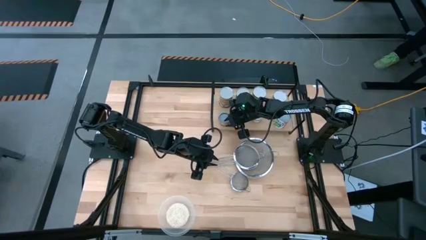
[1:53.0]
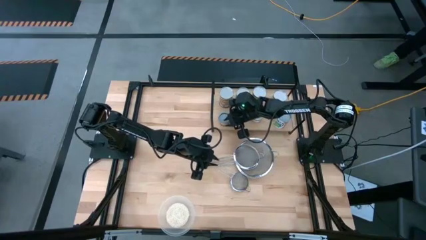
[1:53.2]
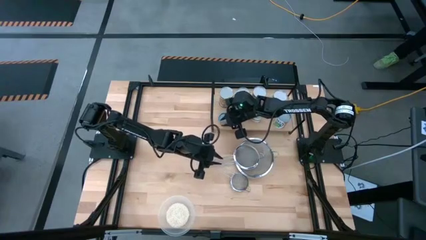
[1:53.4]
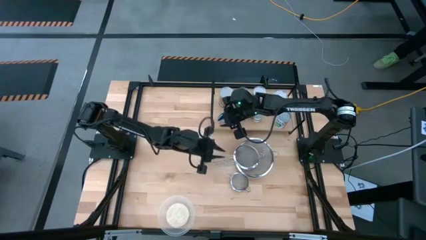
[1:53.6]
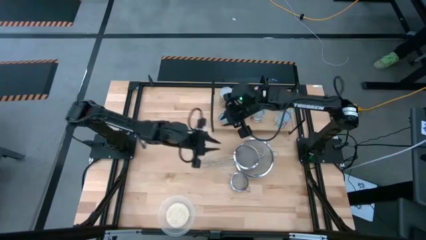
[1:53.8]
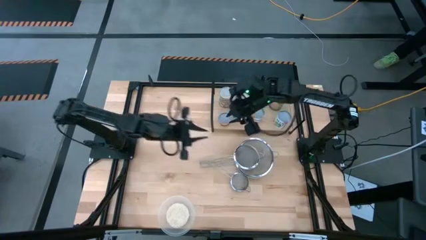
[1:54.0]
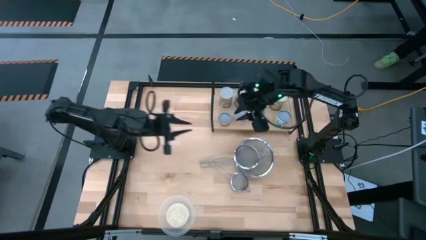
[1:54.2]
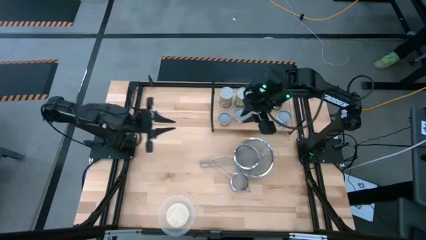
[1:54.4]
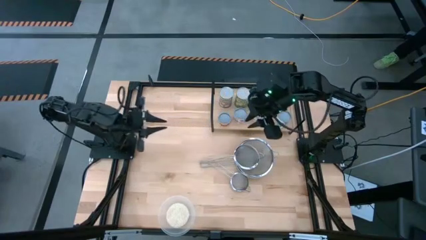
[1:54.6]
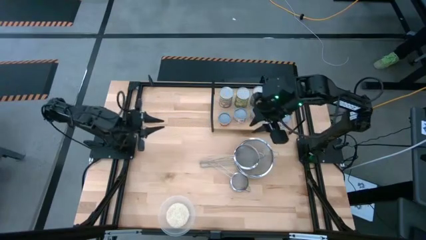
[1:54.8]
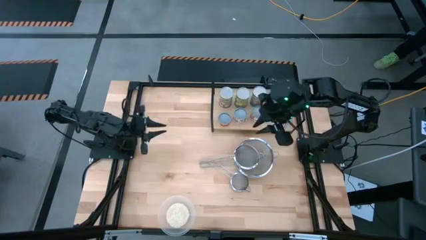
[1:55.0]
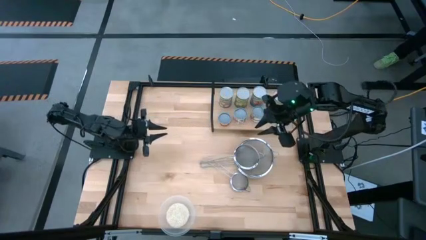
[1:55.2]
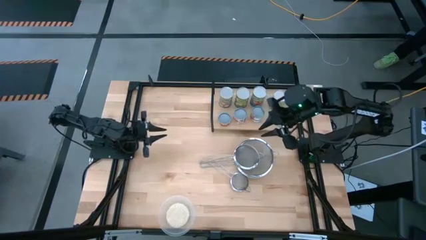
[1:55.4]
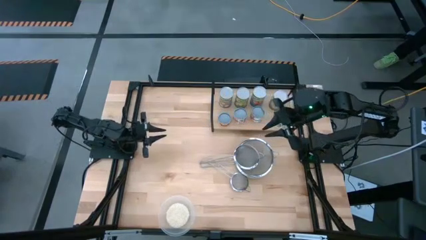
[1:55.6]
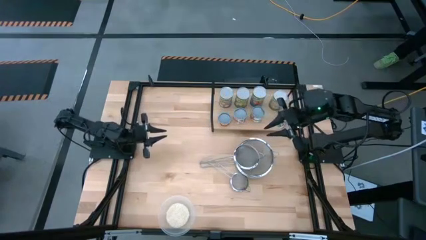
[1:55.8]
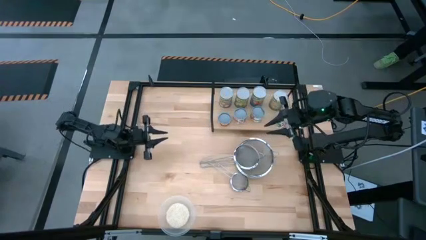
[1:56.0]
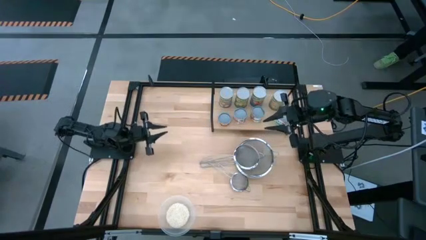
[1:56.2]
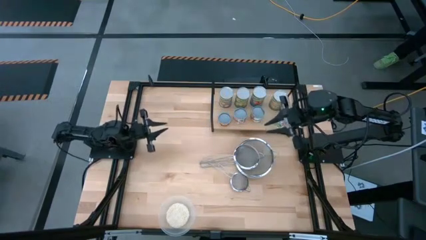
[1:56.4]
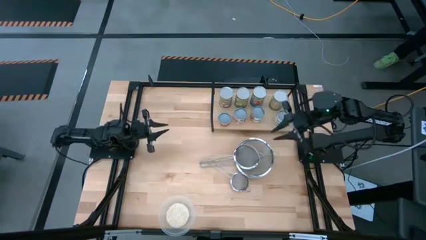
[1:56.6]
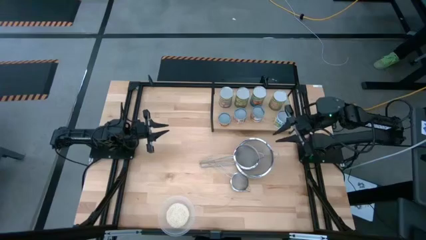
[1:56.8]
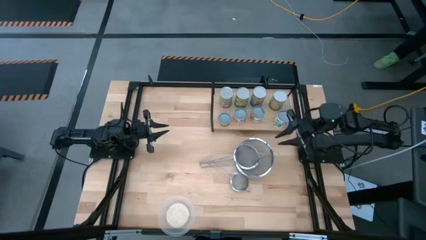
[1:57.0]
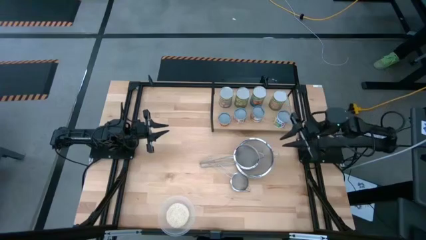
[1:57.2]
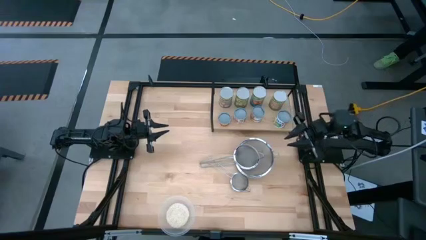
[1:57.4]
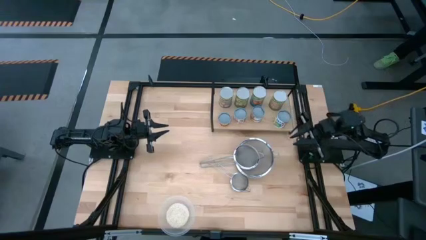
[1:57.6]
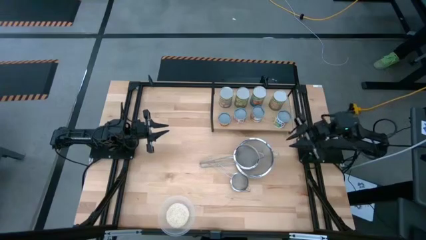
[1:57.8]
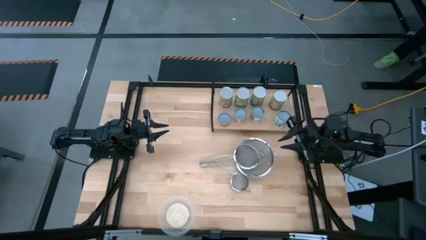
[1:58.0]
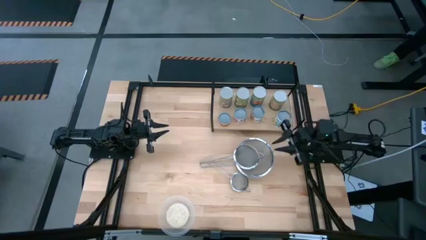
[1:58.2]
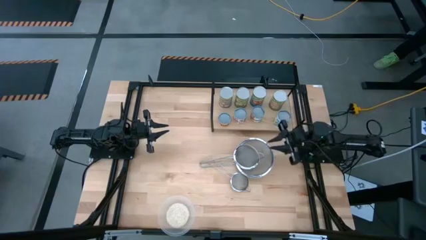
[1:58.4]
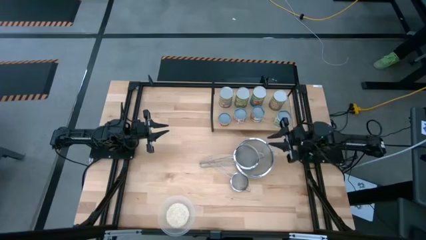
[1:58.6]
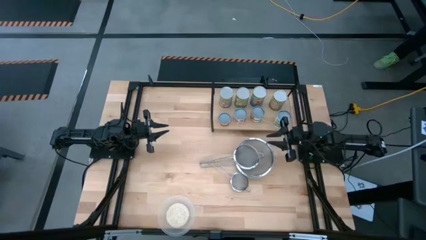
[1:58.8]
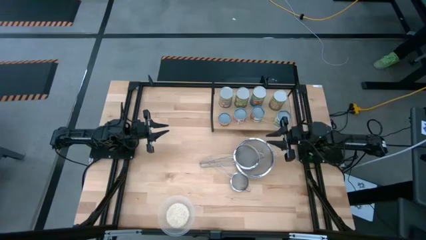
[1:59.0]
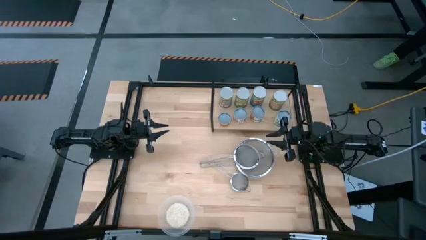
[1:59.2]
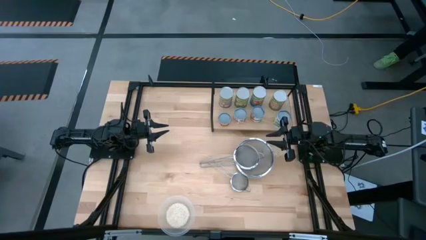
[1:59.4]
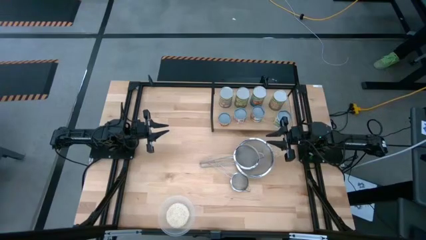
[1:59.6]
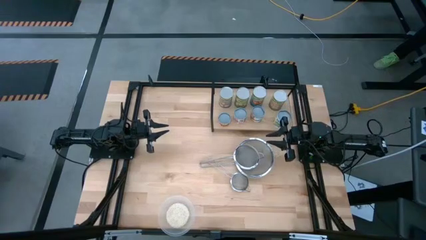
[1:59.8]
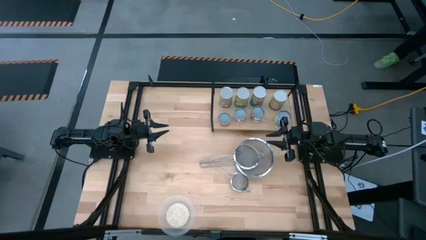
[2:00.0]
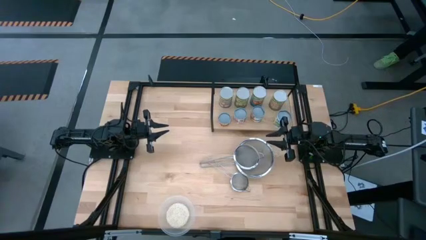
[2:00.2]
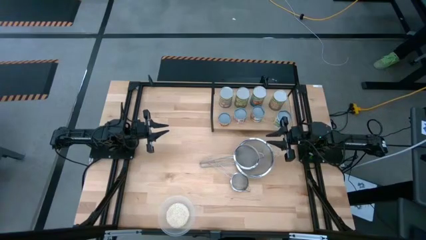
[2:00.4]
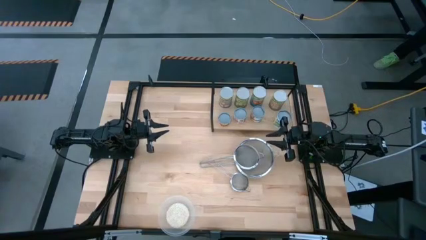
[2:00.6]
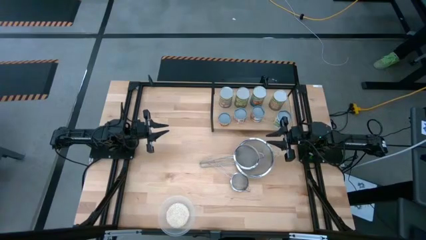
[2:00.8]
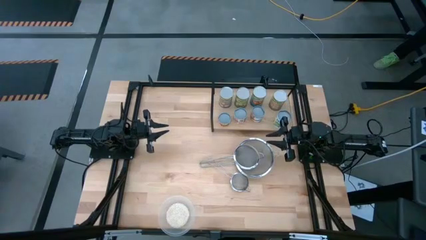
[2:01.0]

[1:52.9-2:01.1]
Task: Pick and place cans onto a shelf
Return to Home Position

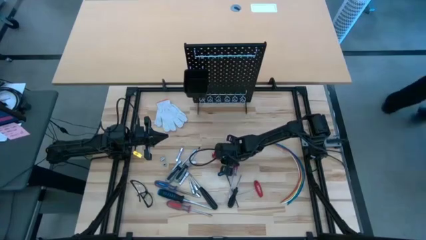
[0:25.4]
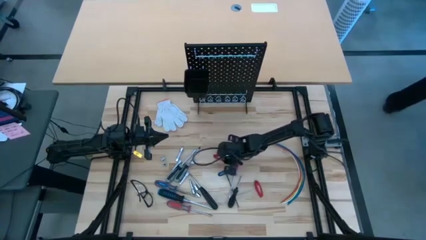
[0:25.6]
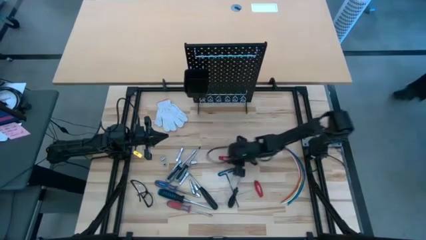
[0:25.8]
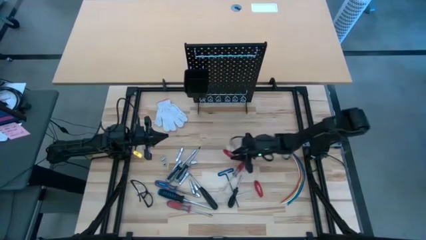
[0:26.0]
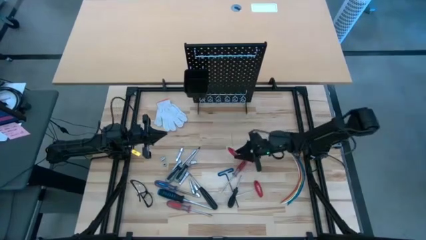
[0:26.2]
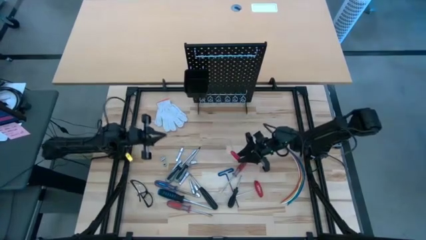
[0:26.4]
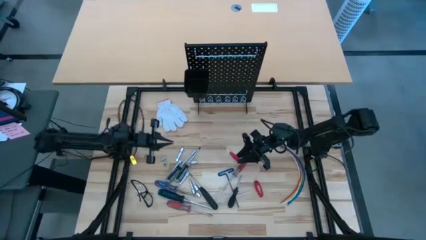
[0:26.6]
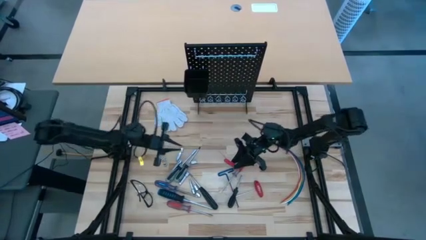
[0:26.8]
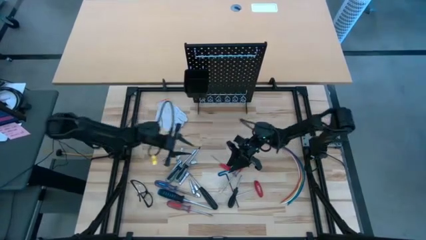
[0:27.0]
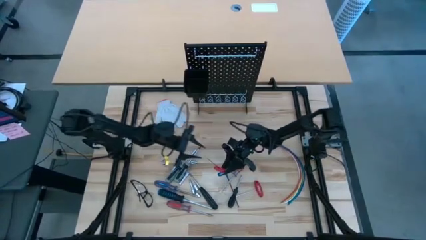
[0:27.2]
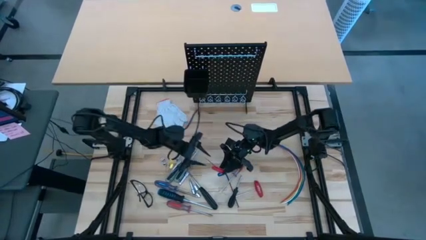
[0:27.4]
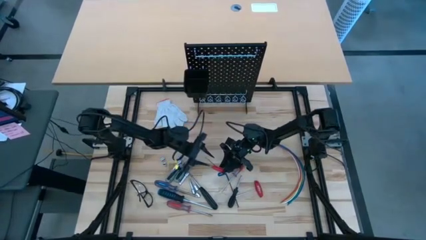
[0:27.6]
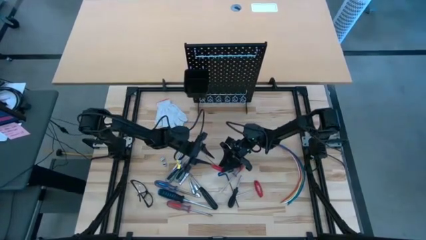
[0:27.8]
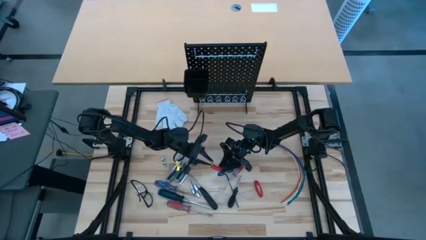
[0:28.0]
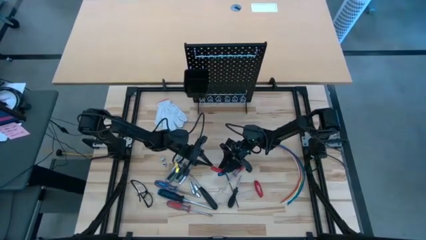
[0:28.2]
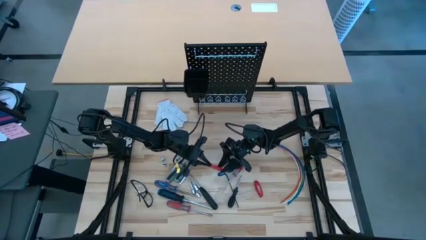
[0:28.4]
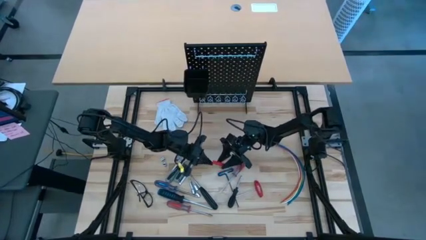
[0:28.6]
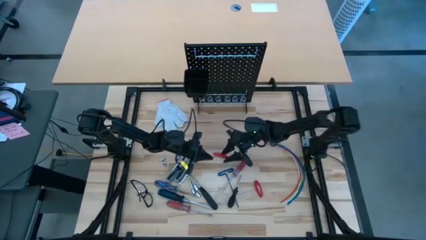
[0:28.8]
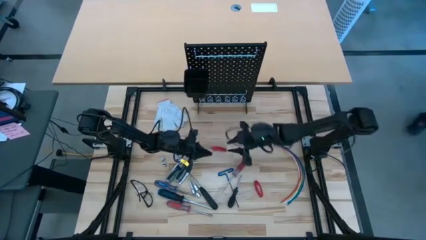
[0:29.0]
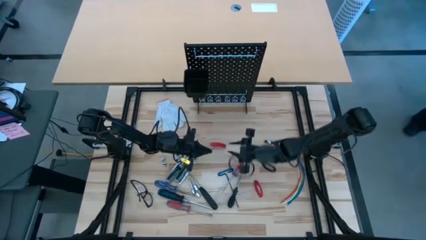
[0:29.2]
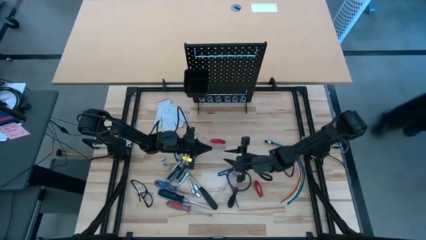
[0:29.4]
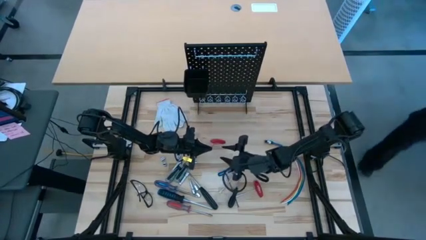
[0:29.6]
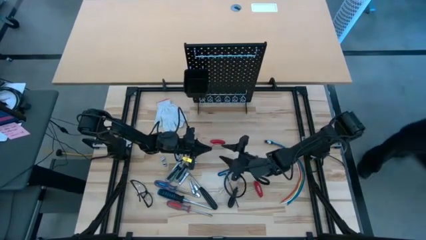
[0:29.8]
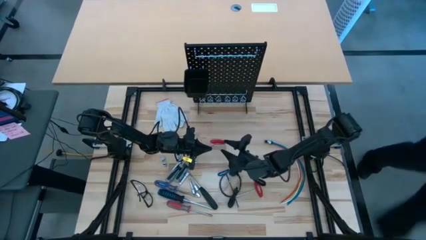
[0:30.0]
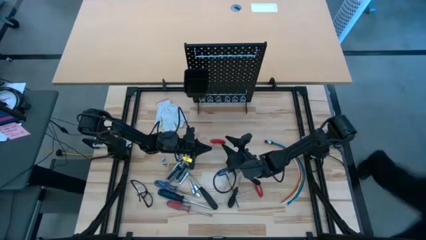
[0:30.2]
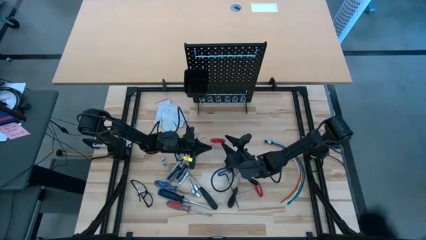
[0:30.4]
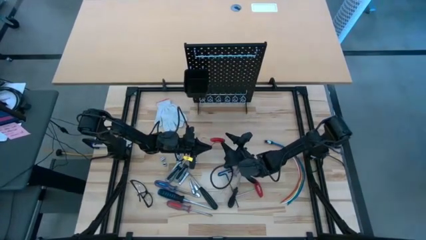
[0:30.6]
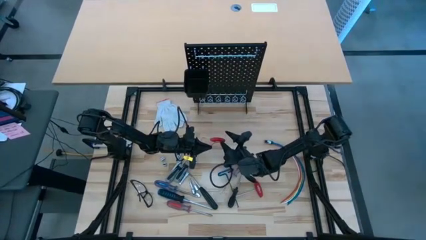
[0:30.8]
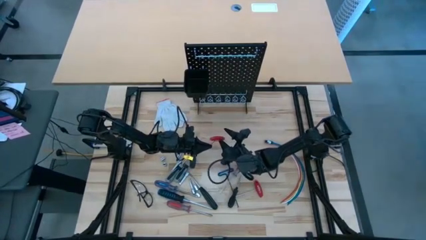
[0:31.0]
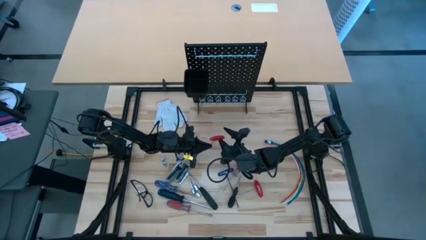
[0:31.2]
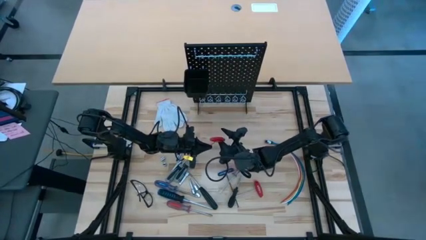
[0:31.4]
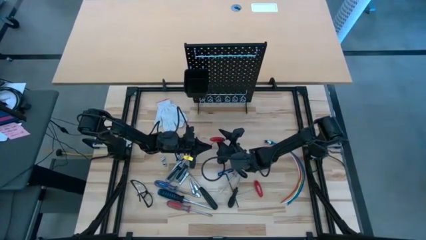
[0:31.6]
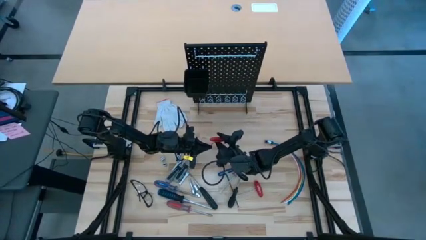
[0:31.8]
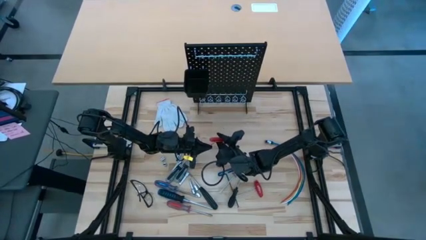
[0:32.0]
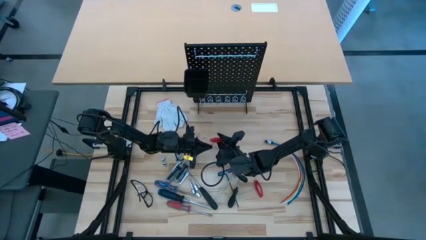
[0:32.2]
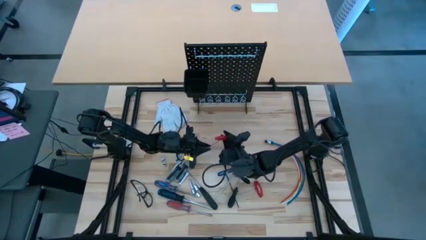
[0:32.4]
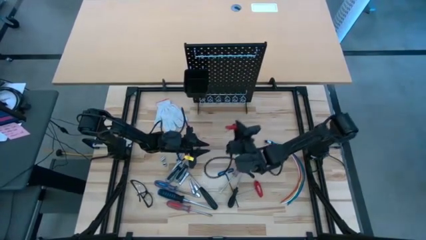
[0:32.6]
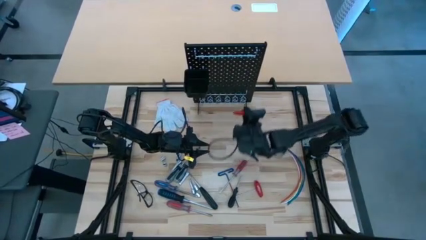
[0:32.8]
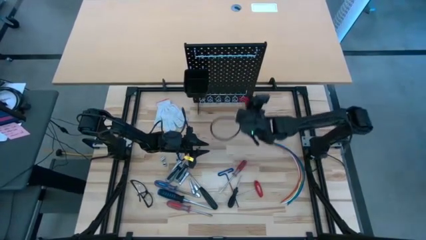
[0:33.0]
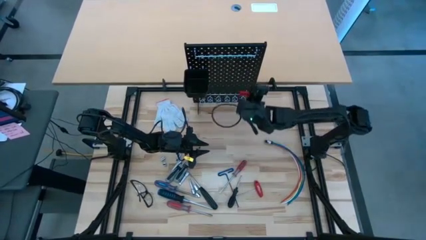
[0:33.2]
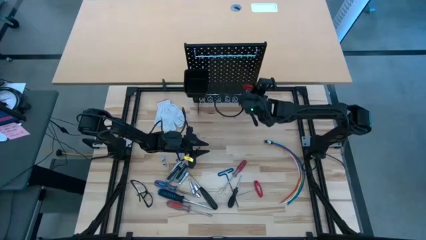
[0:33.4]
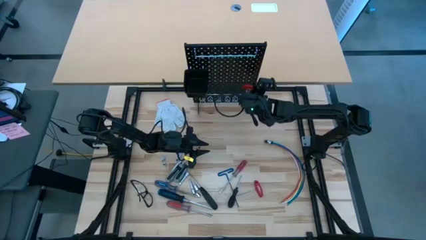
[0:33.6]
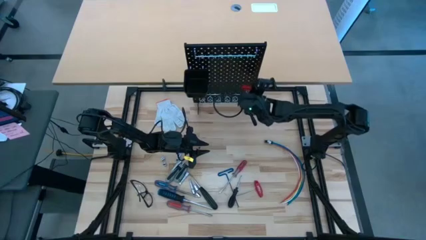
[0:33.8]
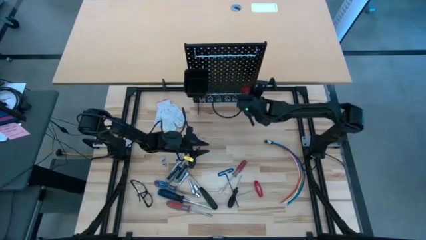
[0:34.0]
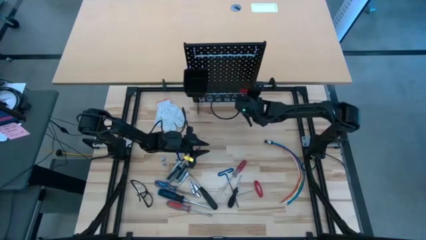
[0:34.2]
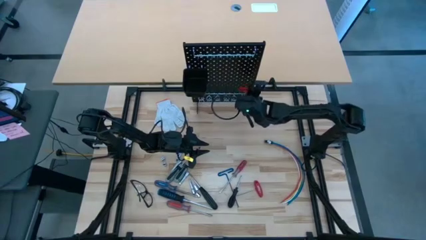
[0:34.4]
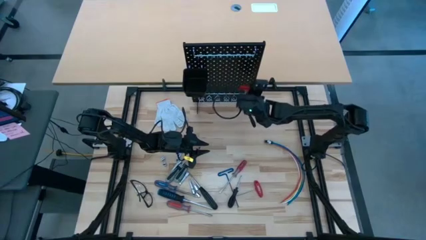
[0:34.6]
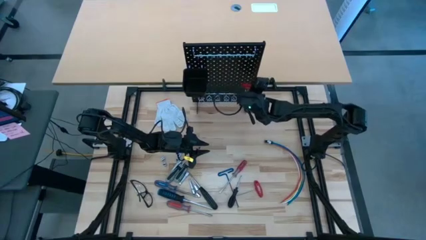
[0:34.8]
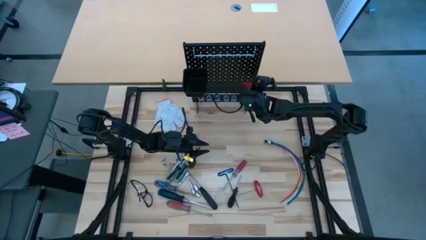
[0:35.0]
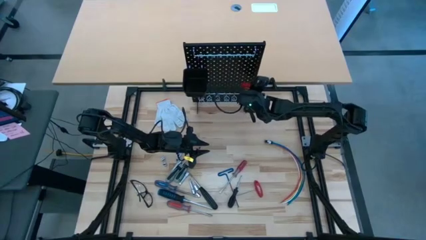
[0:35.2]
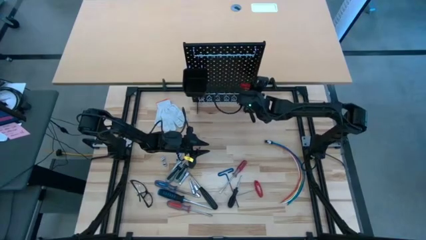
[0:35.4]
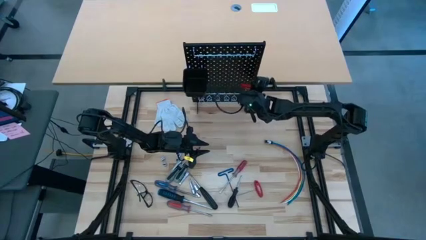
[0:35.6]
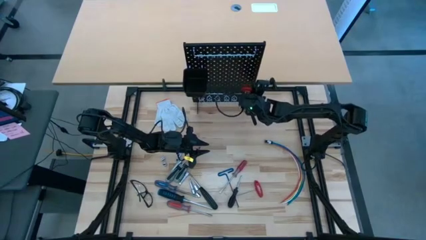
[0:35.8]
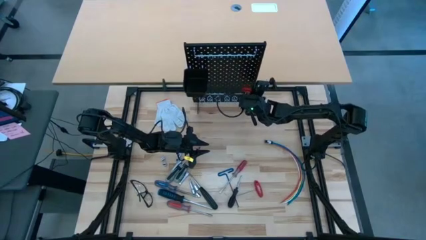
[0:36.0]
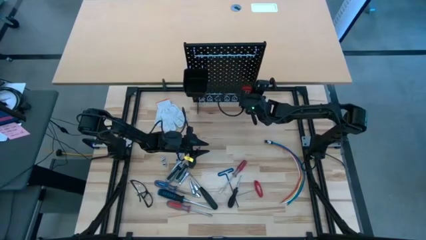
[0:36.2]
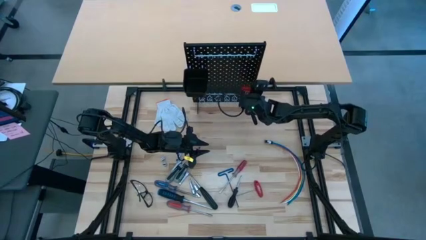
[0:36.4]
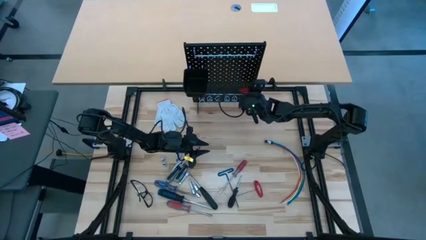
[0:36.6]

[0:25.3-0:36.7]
Task: Hang tools onto peg board
Hang the red allen wrench on the pegboard
